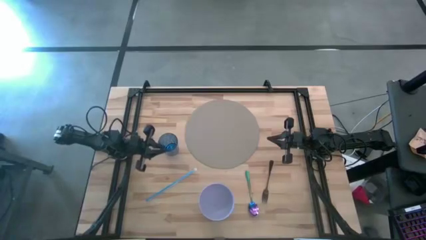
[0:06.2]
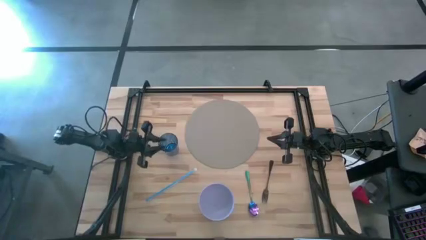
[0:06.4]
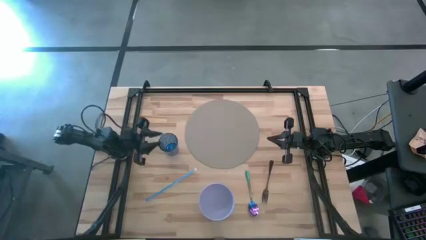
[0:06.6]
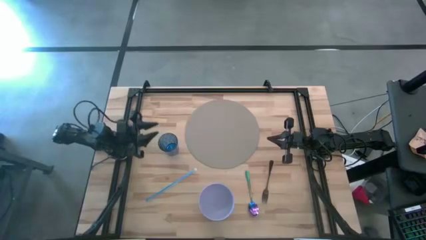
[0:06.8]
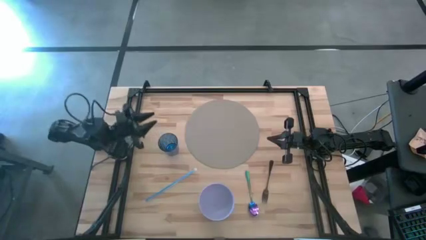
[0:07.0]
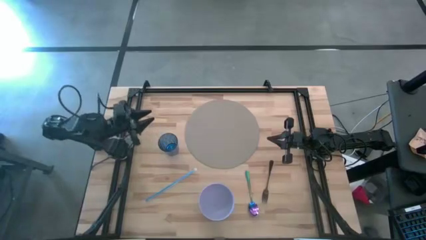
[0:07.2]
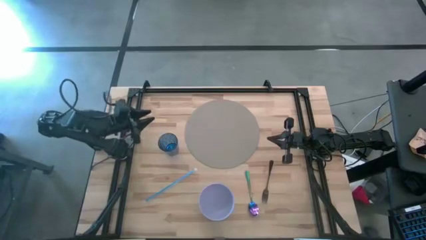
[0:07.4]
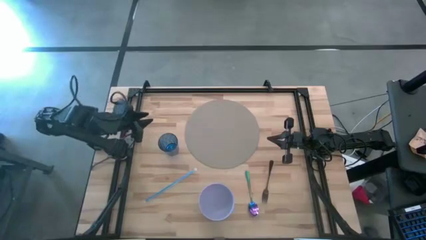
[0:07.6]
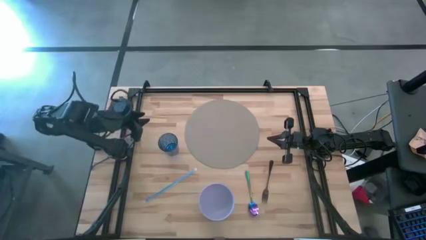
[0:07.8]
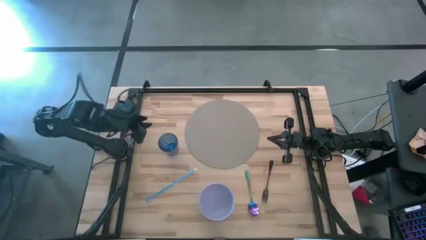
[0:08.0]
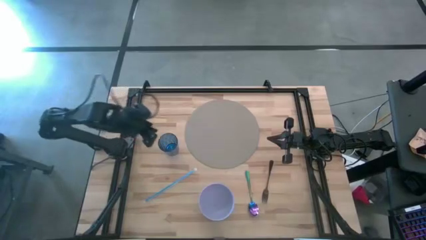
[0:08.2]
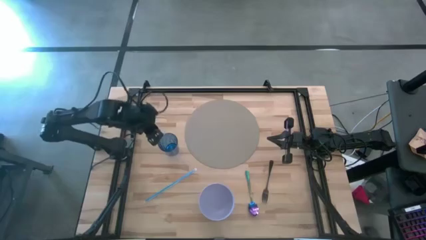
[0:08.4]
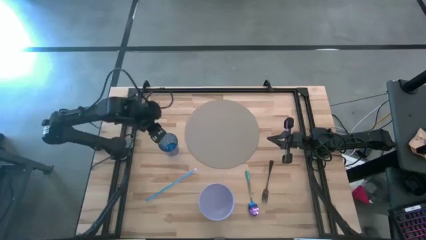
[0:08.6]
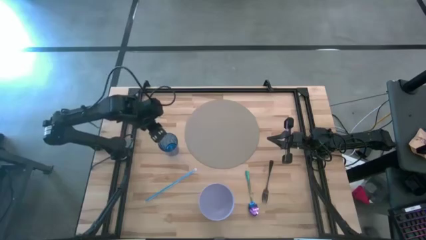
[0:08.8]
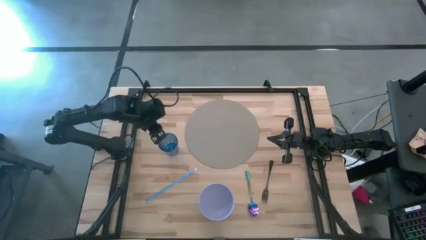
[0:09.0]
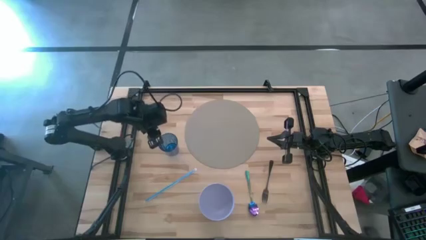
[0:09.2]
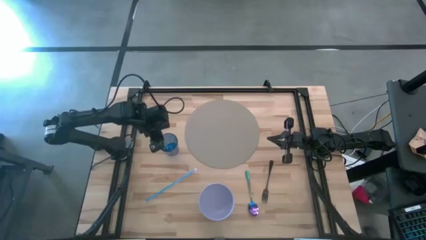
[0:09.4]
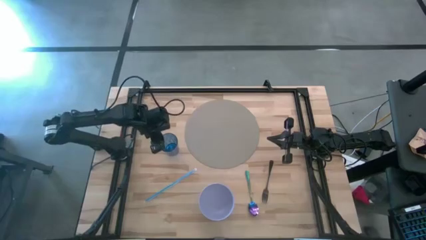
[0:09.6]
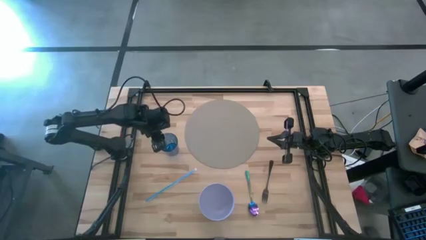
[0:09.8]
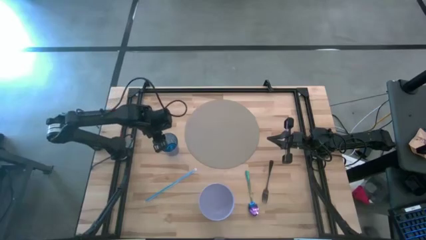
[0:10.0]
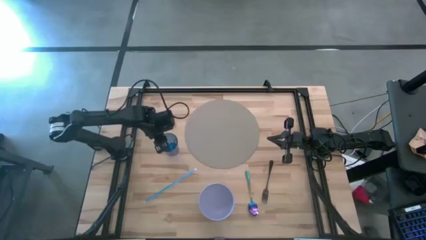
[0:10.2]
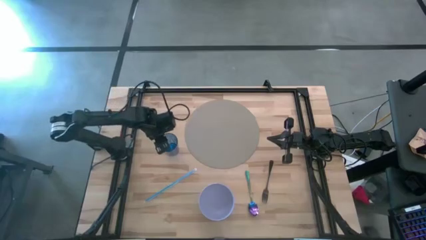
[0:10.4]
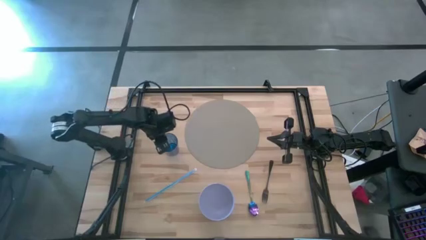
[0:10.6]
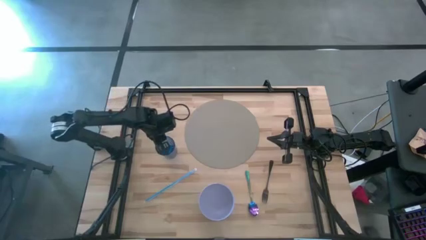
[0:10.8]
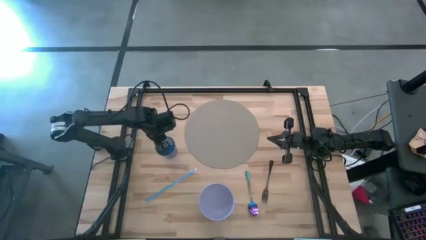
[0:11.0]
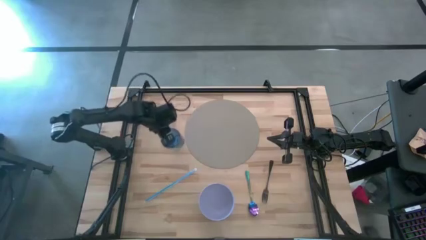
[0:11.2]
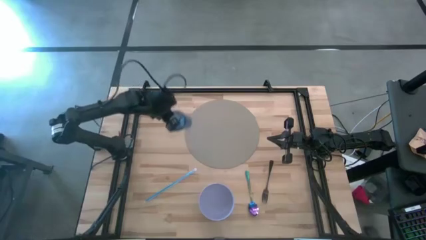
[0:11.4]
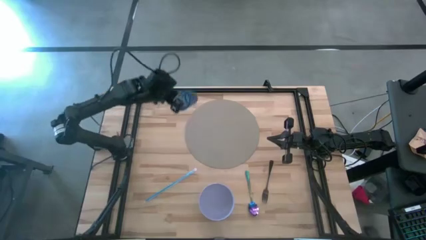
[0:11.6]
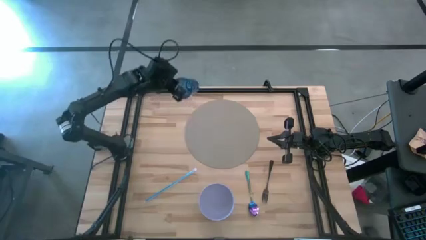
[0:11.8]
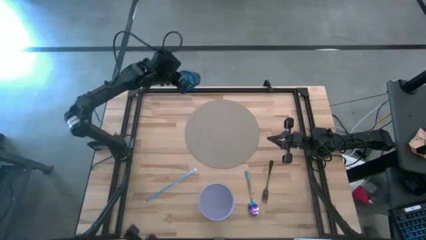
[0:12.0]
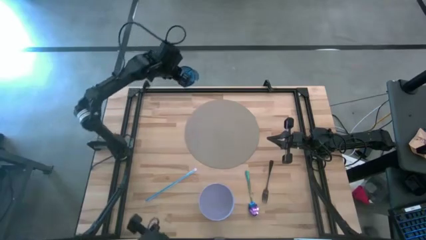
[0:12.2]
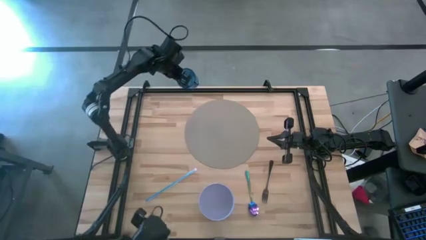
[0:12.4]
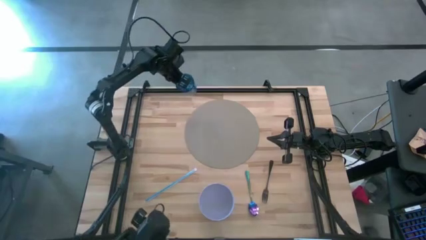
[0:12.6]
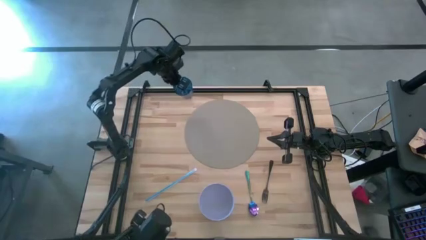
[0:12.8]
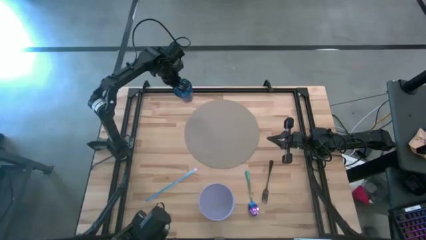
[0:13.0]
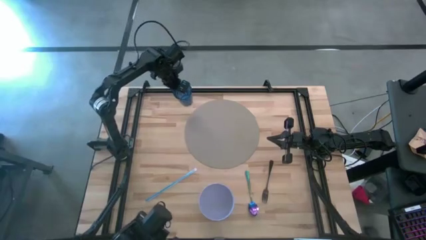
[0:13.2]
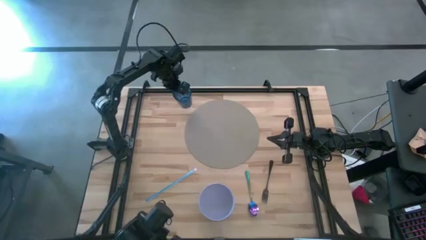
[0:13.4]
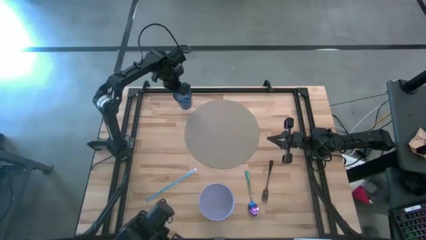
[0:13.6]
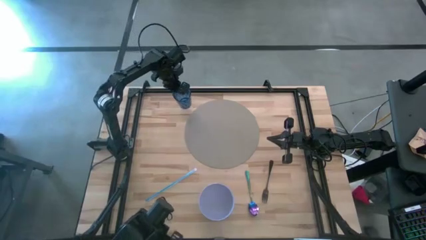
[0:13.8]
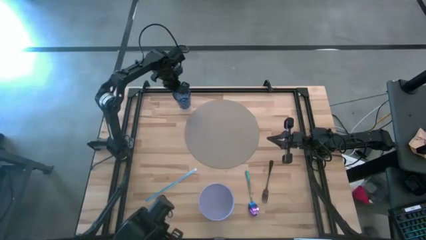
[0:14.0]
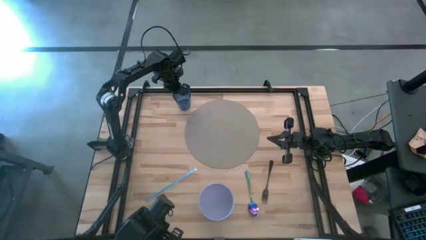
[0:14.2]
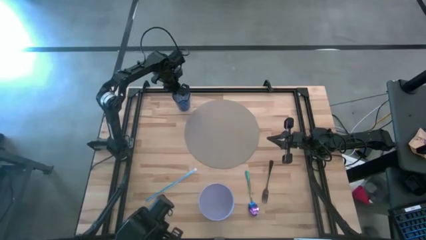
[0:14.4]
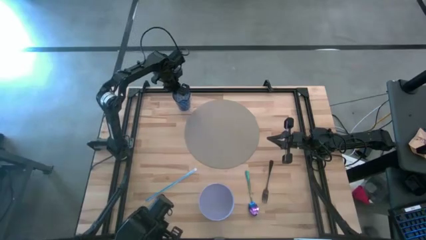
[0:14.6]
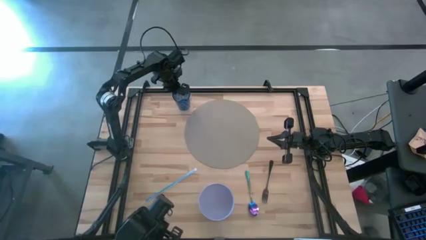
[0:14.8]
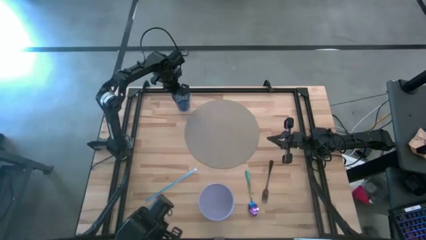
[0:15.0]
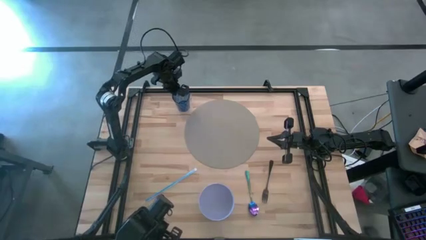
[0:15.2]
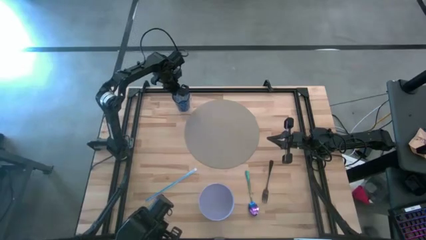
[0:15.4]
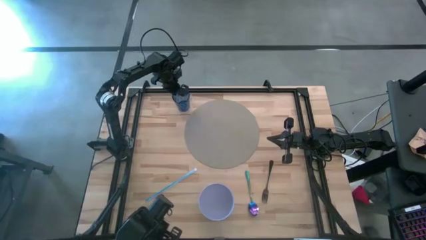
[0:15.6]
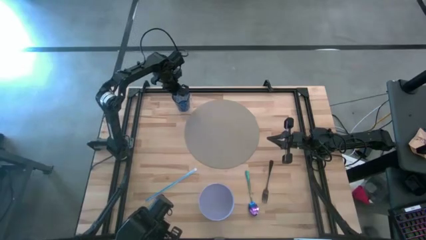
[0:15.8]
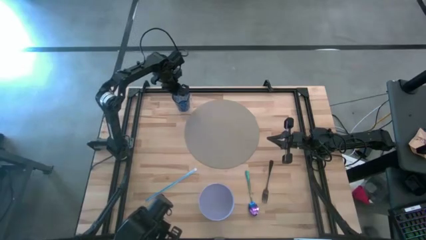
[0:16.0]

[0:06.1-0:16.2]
Task: Pick & Place Utensil
Put the blue cup on the top of the table

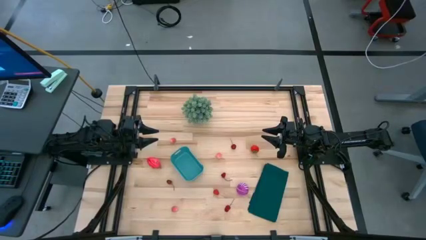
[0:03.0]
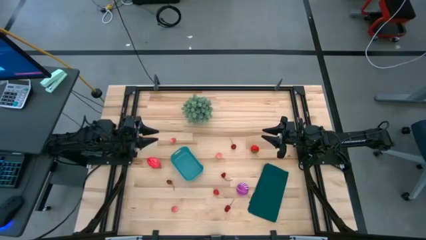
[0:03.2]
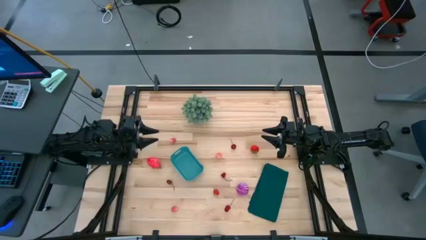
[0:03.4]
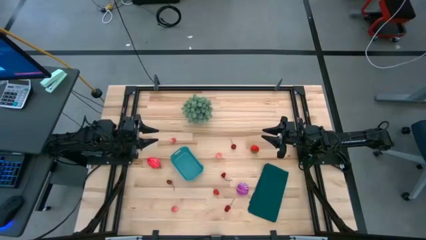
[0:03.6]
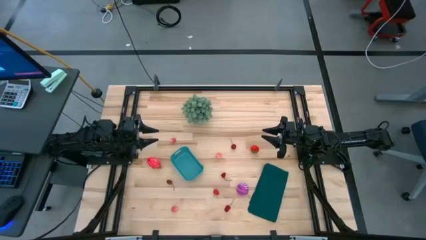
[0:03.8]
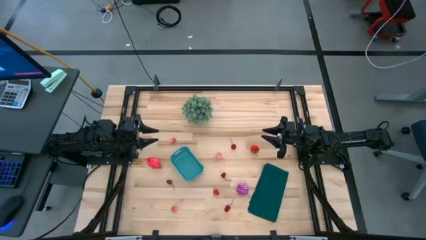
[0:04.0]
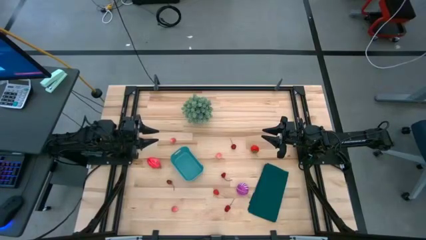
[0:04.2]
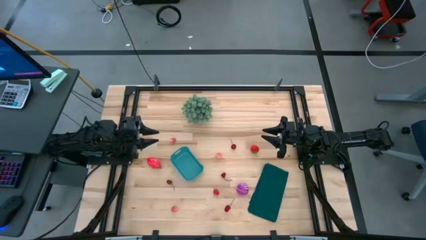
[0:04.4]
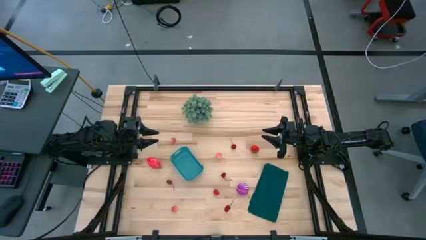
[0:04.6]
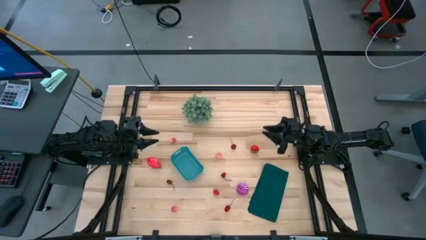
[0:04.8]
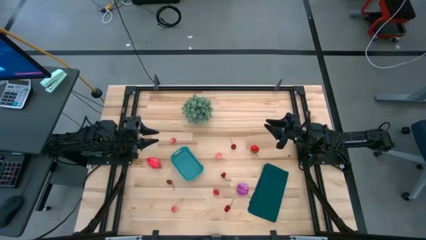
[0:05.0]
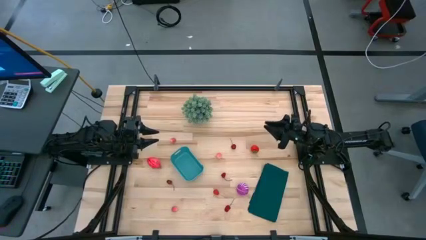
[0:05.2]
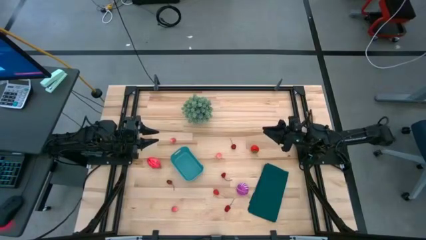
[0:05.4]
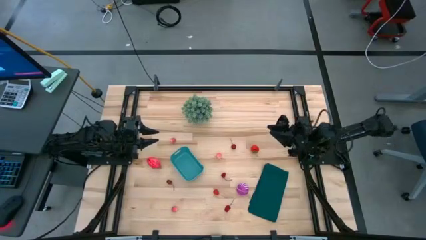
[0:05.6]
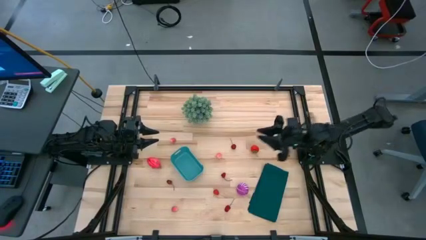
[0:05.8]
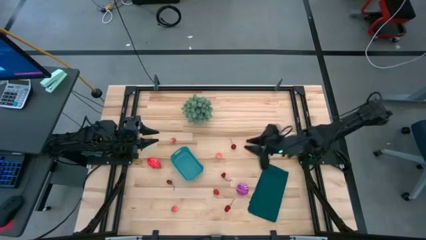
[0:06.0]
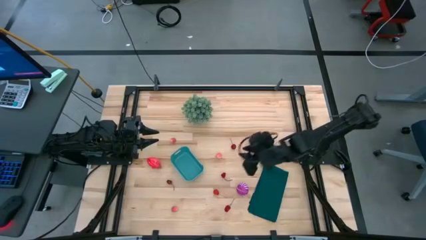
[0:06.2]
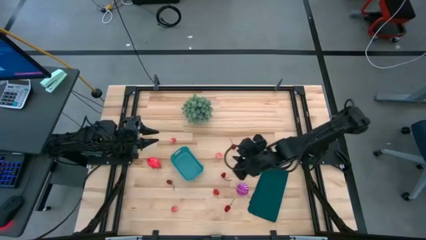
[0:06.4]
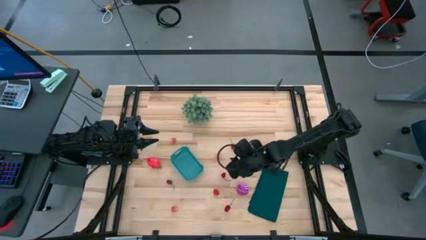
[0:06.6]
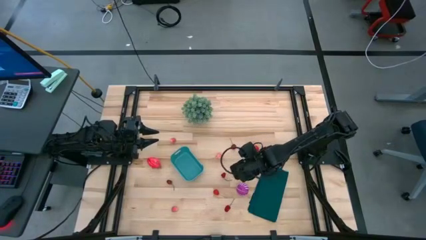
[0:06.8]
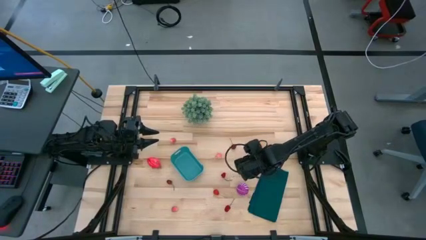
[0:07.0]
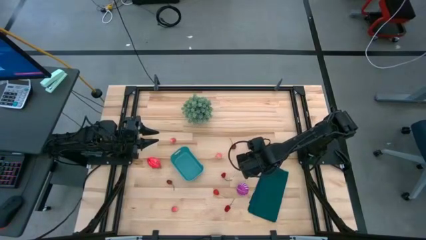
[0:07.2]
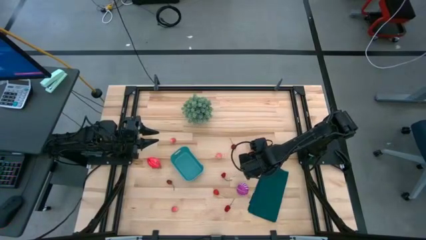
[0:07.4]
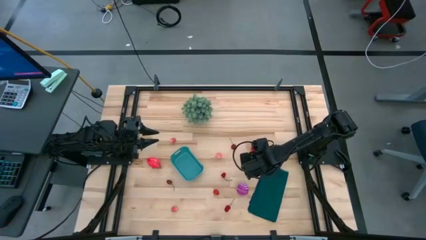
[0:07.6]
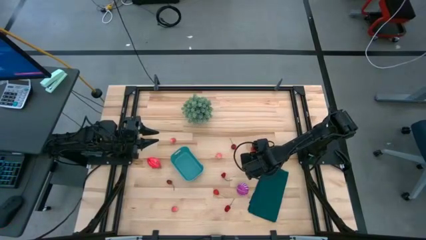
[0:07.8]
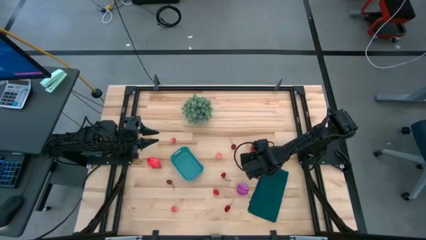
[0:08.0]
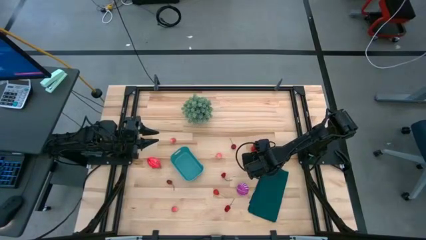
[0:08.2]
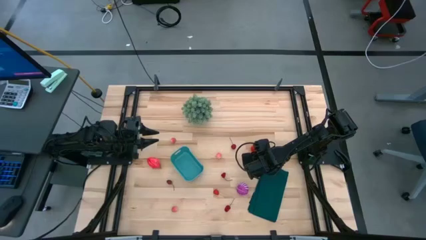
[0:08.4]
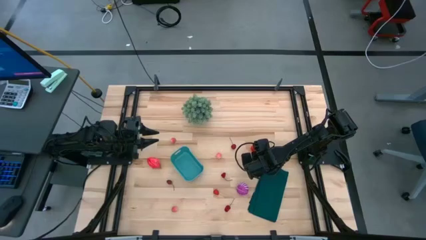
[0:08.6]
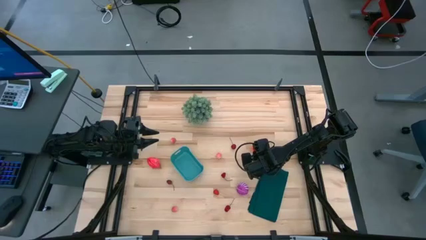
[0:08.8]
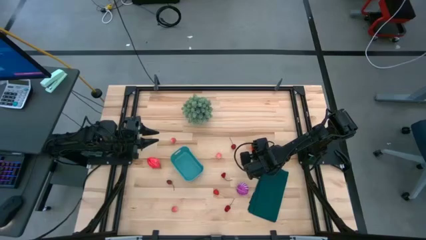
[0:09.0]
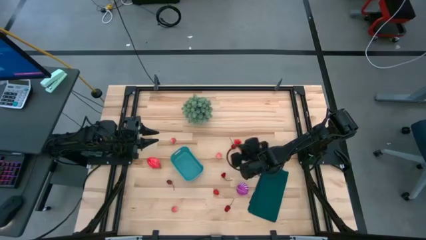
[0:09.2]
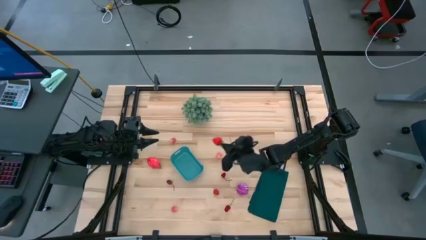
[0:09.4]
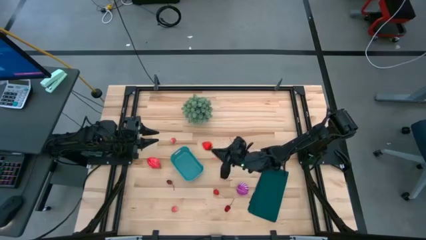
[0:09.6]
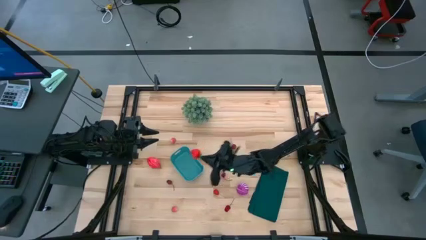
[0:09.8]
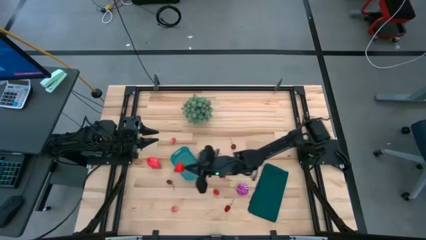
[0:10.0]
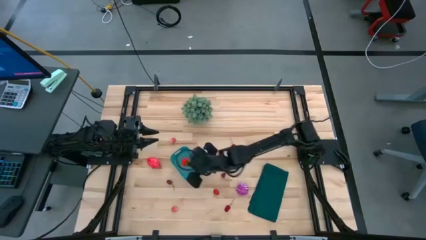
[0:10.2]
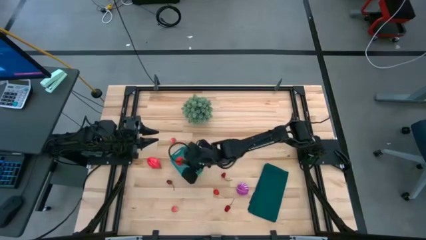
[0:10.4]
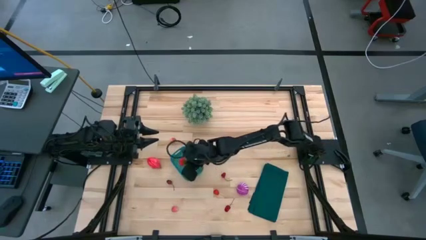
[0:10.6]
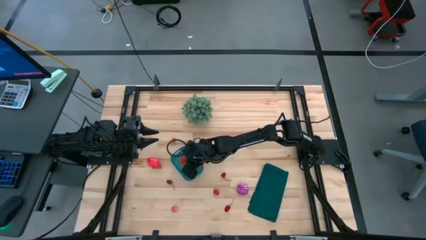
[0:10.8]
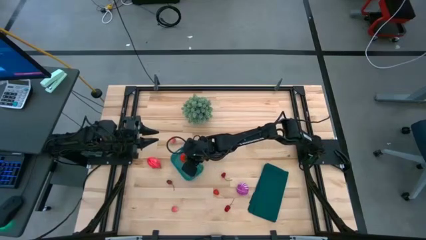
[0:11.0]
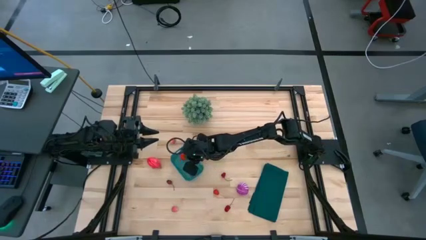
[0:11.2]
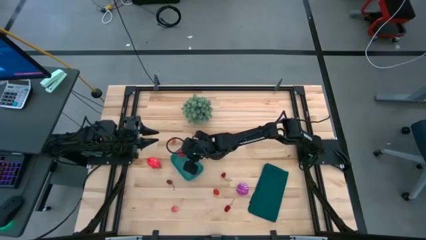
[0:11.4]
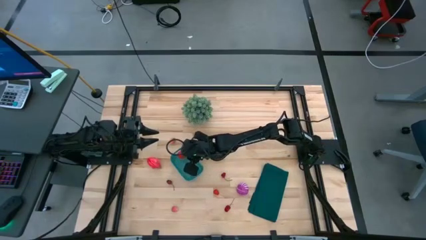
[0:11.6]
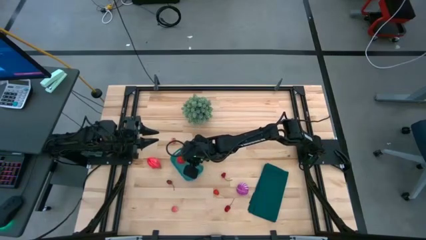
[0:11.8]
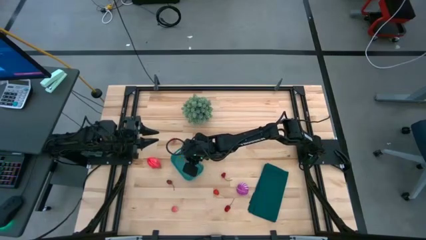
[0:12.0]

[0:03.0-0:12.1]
Task: Pick and placing Produce into tupperware
Put the red strawberry into the green bin
